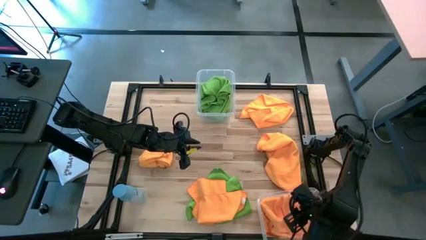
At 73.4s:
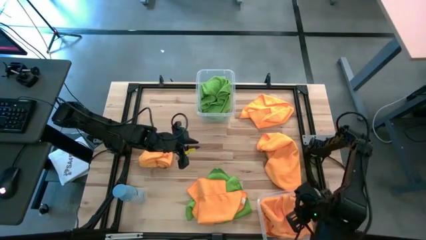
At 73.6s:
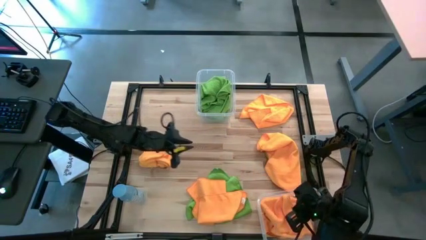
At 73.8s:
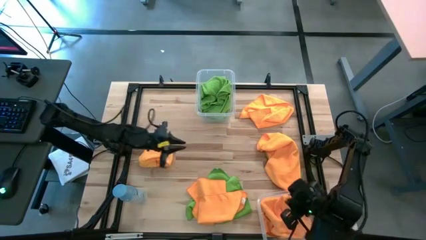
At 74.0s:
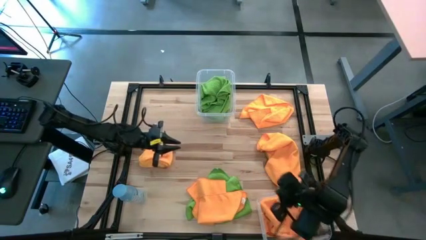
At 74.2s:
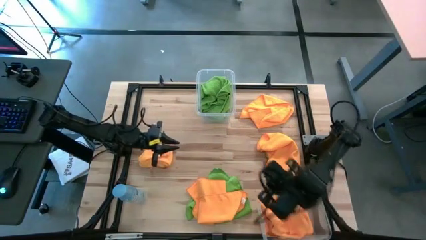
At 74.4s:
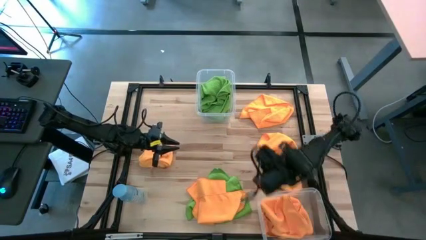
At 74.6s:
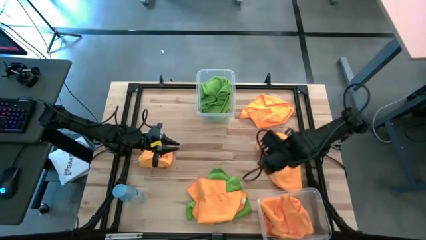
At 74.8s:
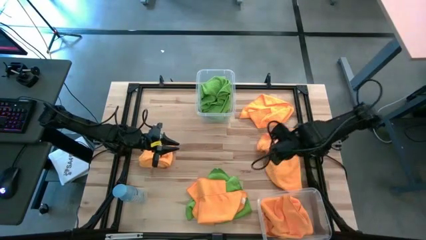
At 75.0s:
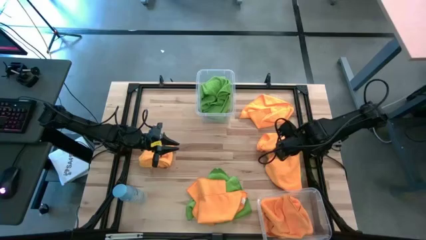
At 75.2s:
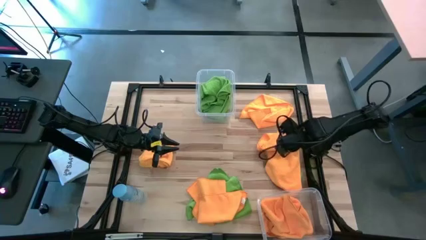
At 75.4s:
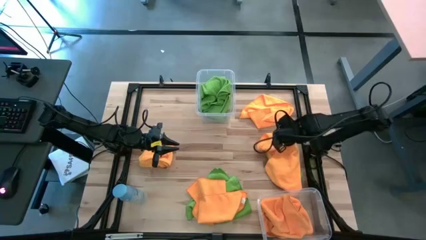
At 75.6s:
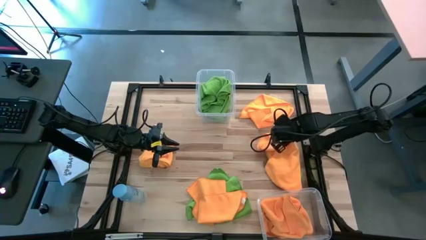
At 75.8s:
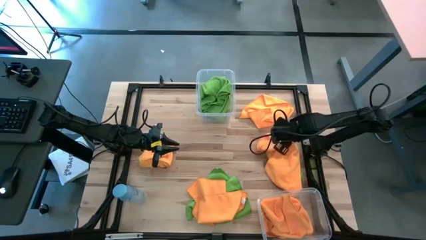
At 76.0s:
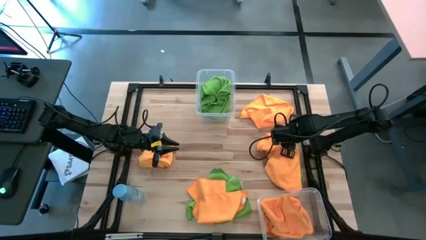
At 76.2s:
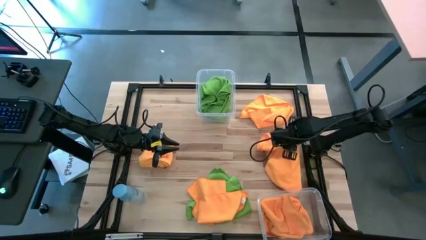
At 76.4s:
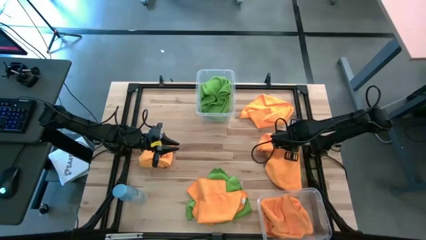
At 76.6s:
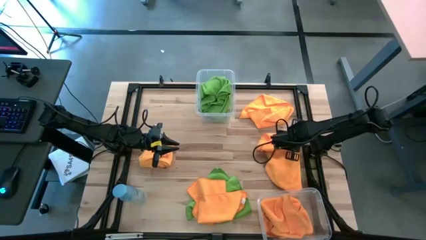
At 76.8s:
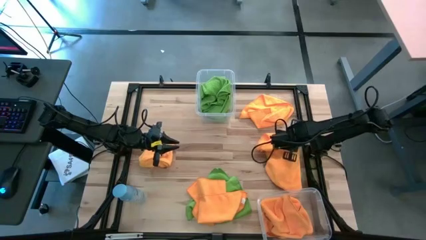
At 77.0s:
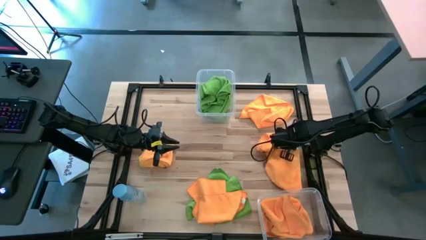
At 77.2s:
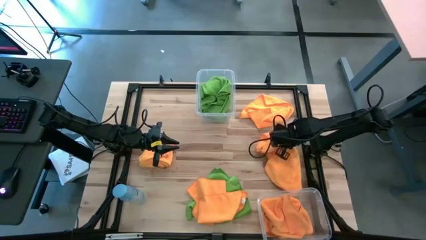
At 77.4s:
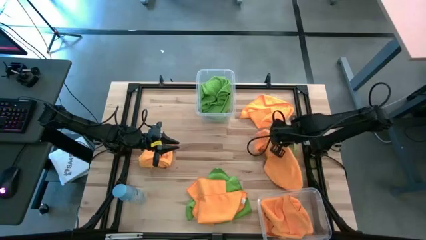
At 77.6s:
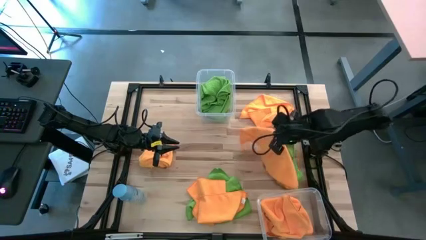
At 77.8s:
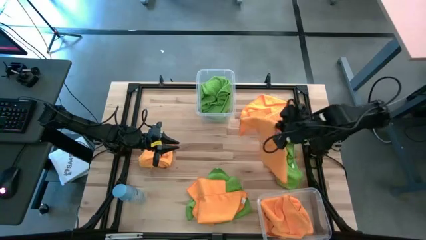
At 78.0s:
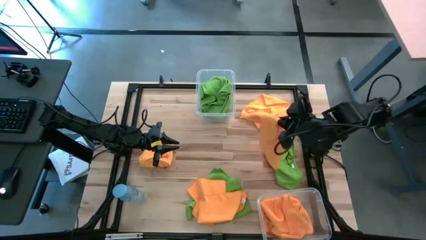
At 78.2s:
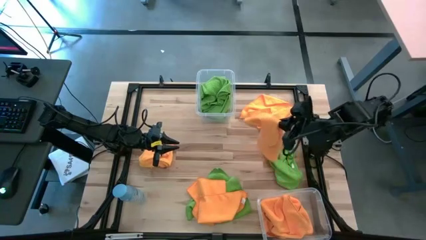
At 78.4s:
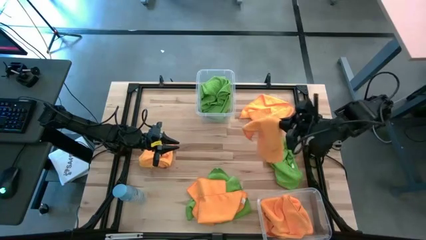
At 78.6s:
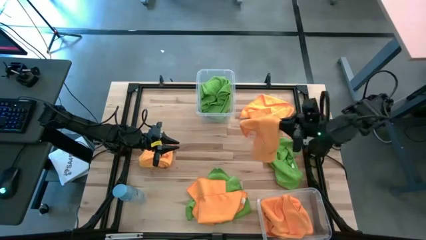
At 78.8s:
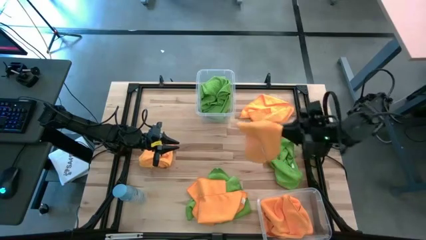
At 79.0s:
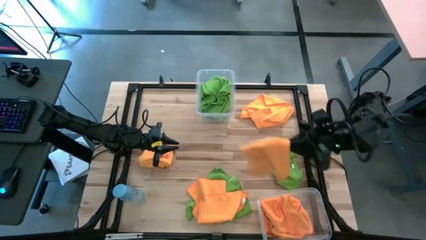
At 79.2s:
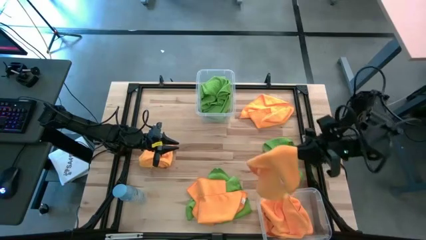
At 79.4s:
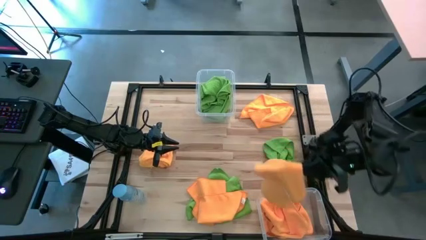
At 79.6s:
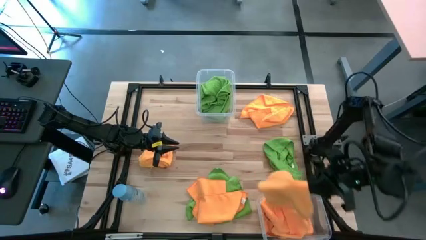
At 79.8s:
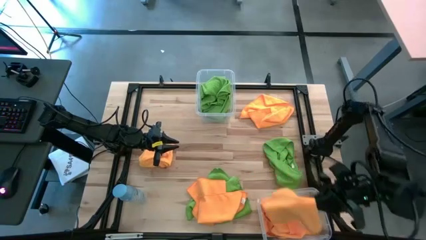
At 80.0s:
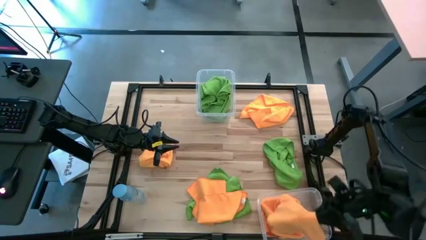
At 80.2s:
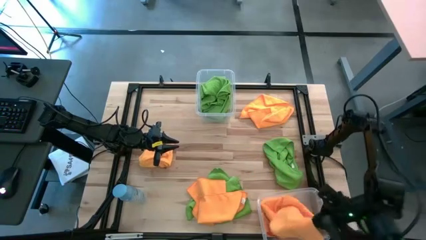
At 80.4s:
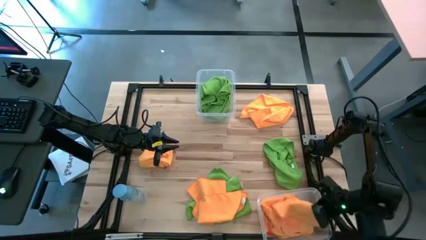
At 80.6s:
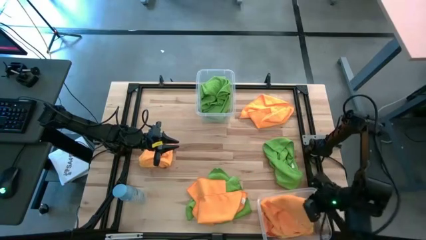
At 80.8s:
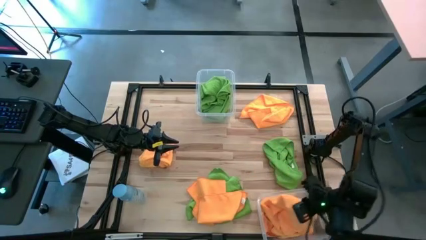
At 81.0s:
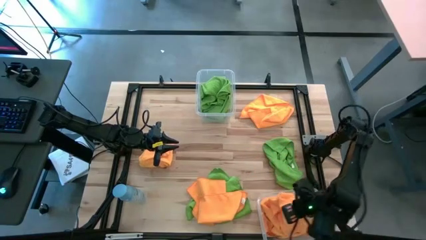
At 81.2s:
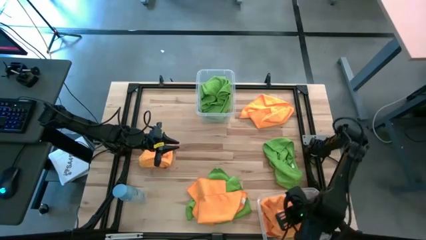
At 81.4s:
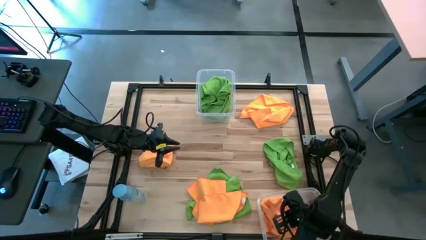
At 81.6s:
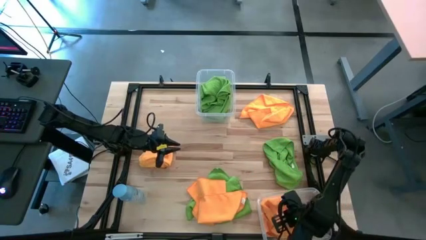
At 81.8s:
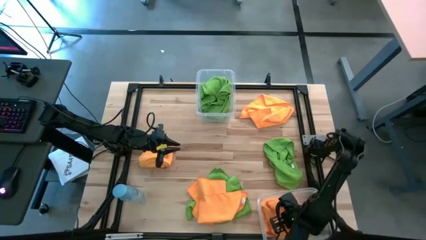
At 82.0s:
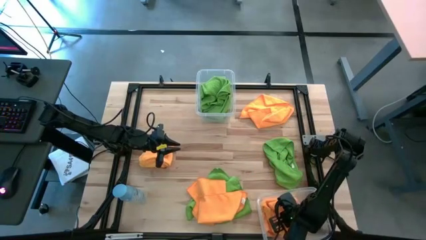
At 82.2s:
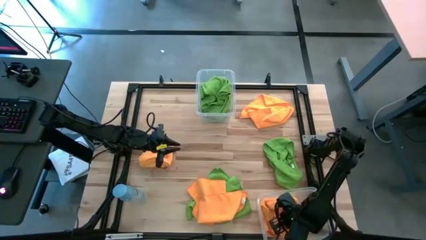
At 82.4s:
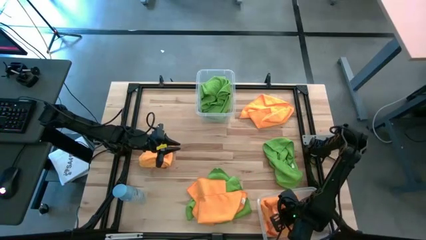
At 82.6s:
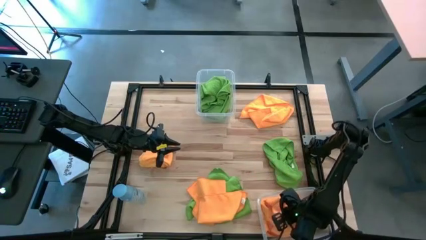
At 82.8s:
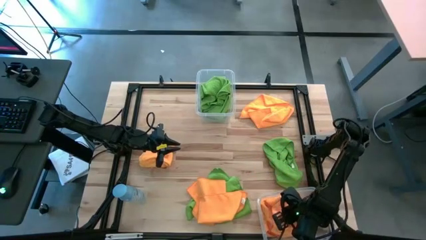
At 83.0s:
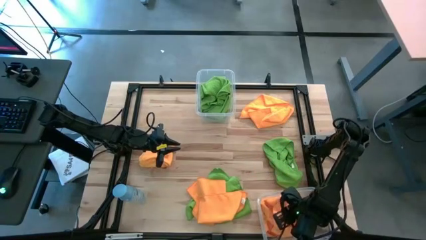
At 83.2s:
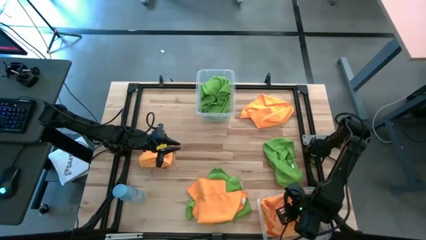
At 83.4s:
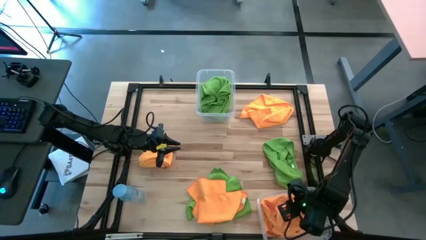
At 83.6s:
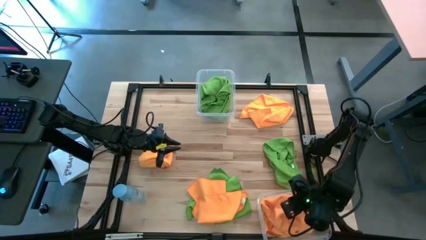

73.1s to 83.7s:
Task: Sort microfiber towel by color & place in baskets
Put the orange microfiber towel into the bottom transparent bin

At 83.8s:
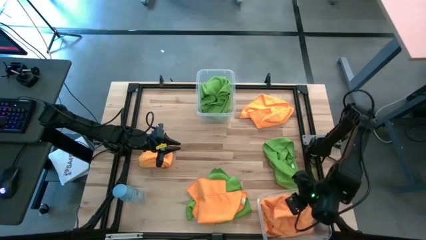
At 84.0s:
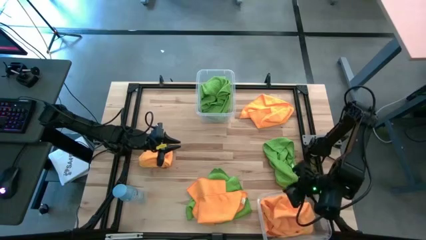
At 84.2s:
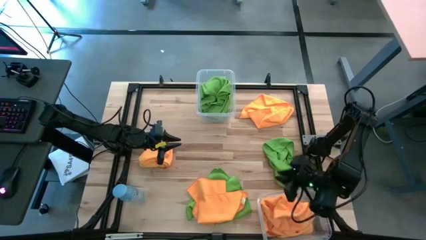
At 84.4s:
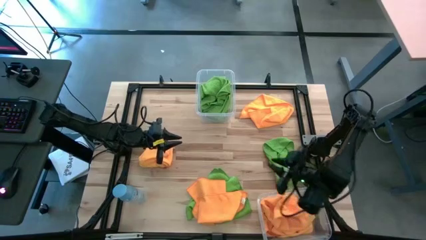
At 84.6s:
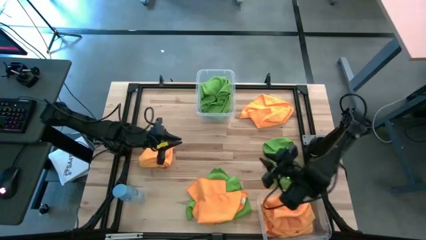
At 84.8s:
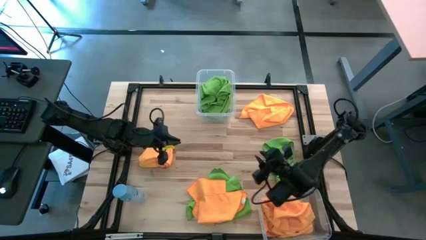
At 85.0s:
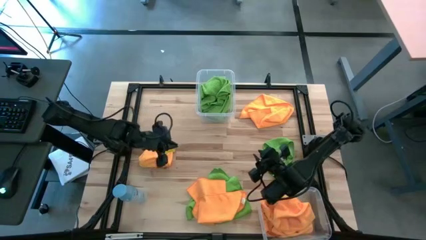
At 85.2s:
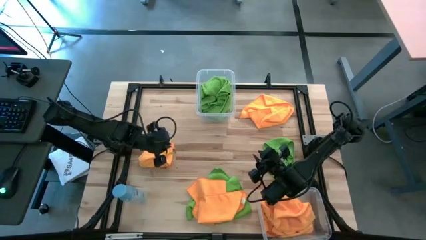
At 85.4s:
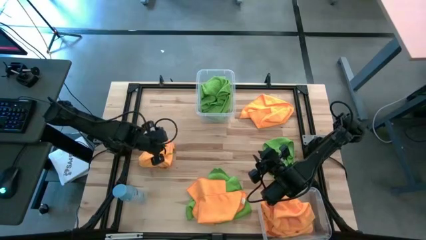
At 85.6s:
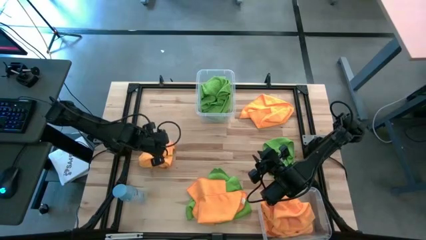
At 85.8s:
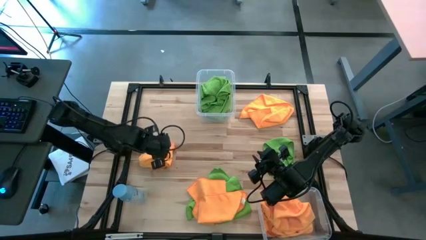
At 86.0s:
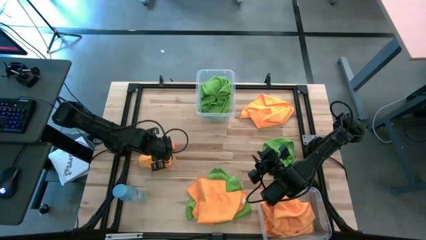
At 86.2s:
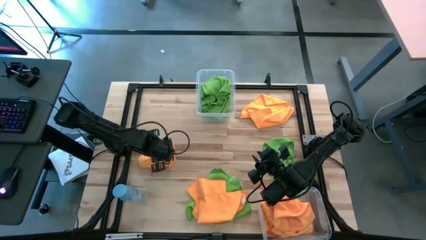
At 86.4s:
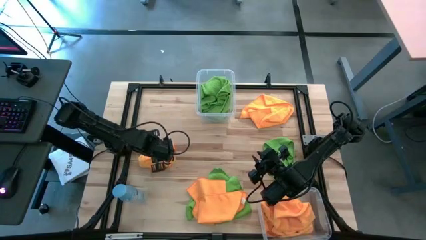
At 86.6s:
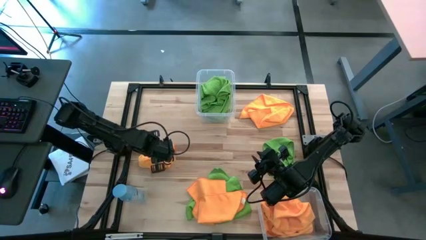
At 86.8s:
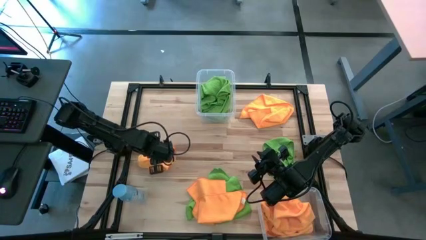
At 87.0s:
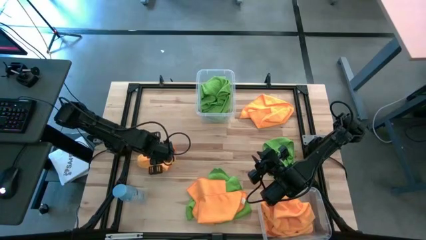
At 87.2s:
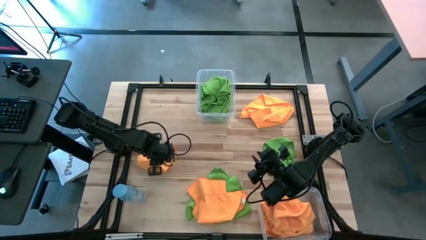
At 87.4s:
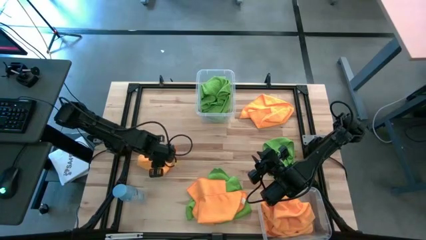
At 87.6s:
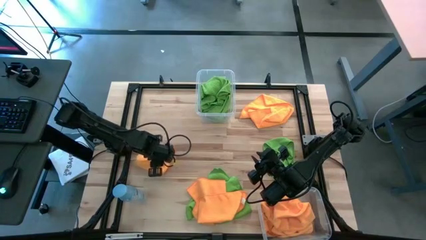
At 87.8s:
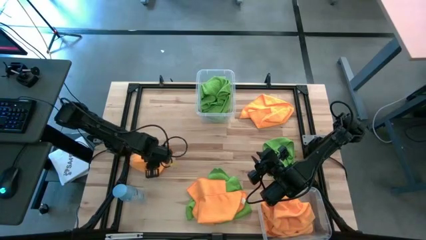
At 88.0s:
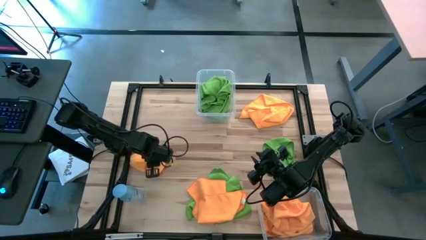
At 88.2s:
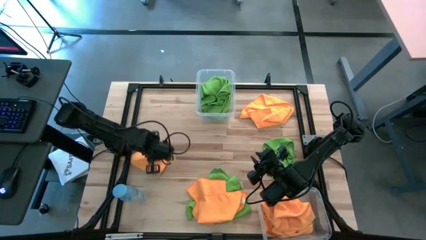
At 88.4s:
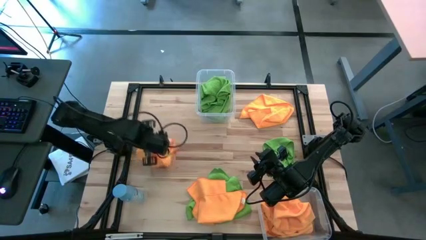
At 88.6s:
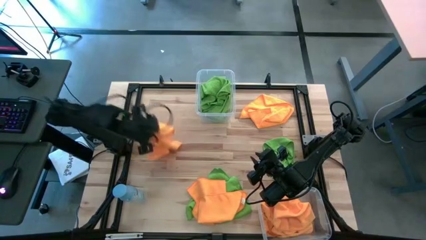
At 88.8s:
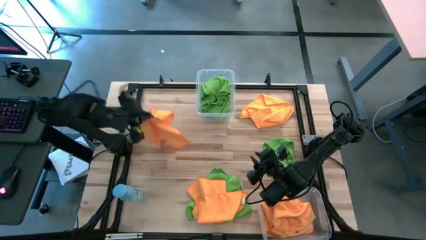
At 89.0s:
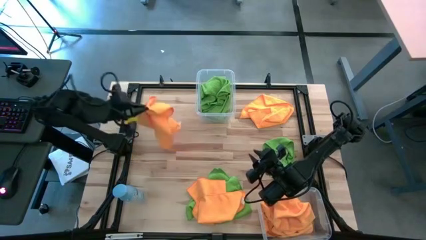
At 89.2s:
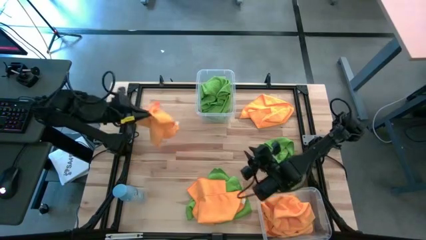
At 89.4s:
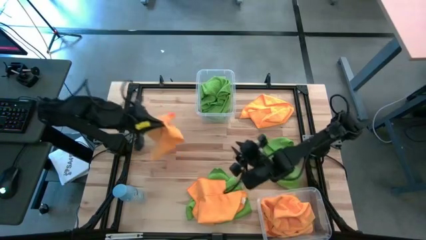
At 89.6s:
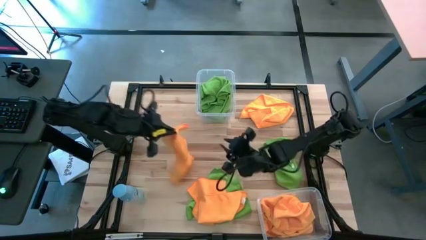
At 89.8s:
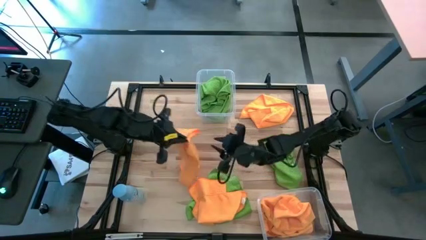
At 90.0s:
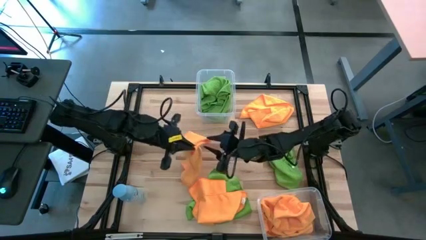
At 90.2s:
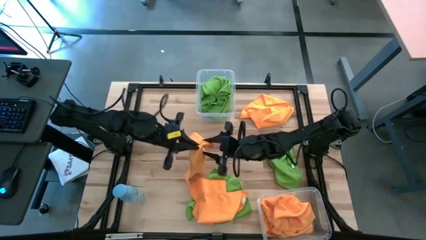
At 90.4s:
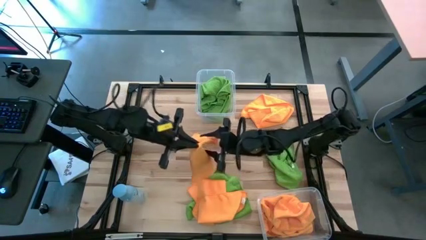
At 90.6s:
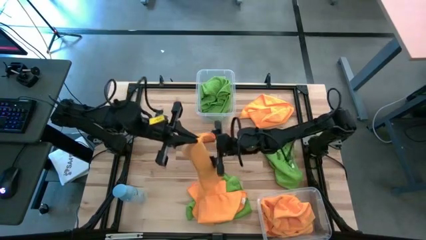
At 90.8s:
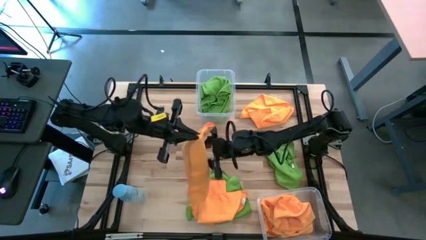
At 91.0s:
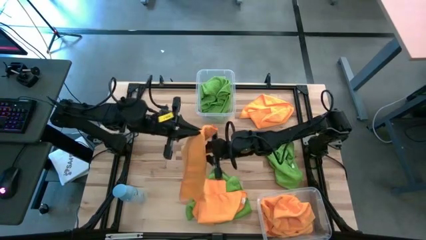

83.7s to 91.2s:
Put the orange microfiber towel into the bottom transparent bin
